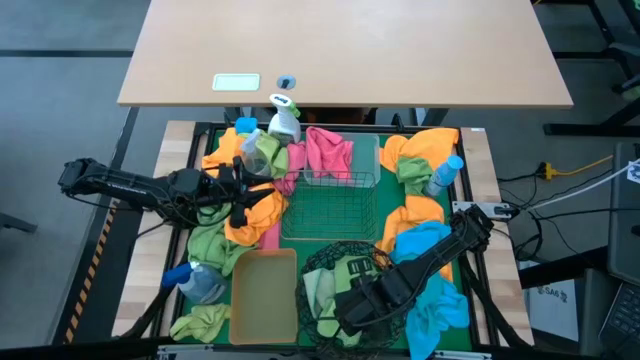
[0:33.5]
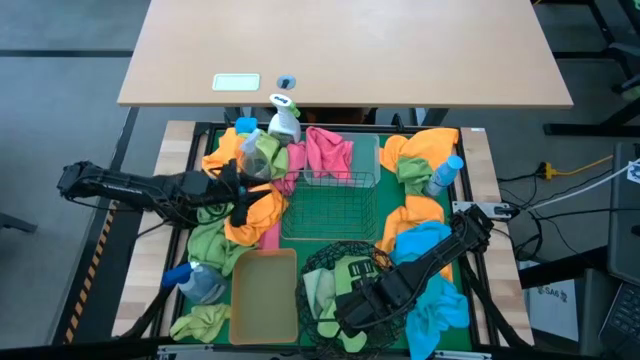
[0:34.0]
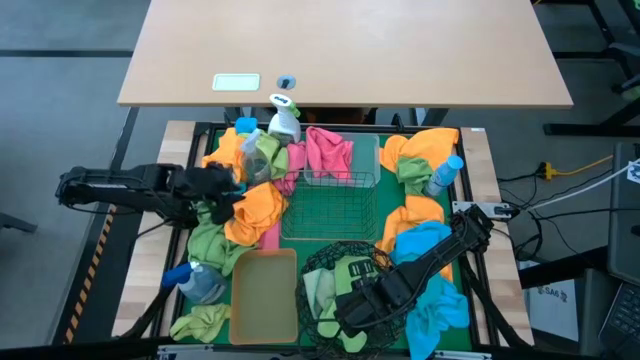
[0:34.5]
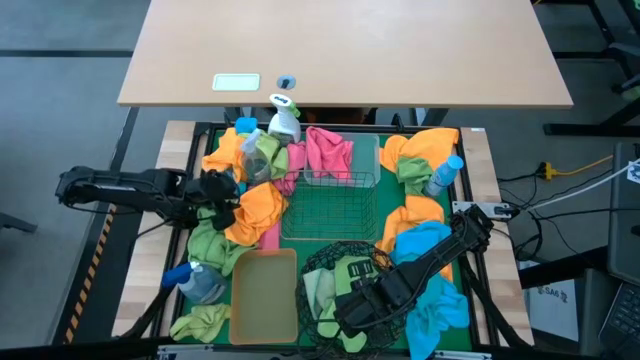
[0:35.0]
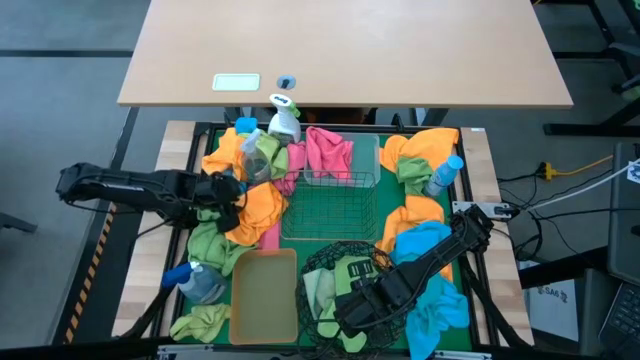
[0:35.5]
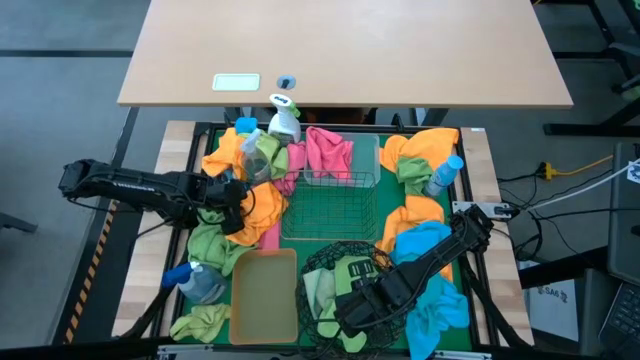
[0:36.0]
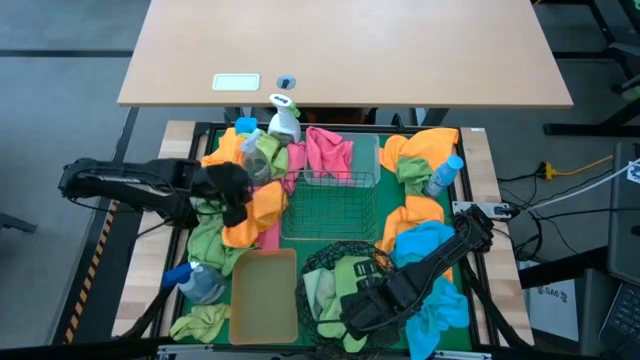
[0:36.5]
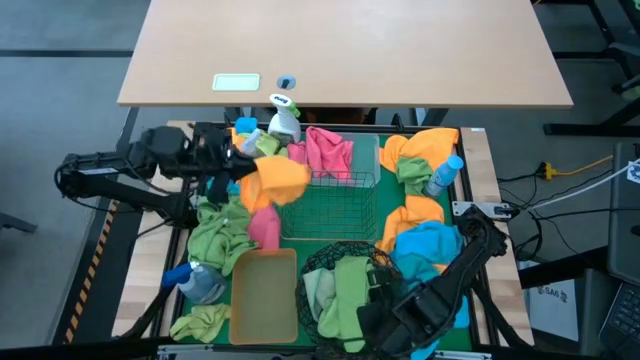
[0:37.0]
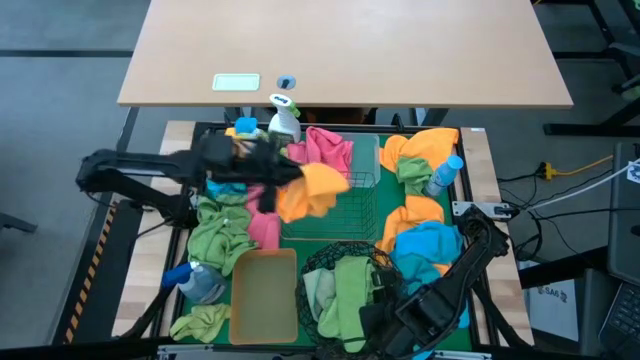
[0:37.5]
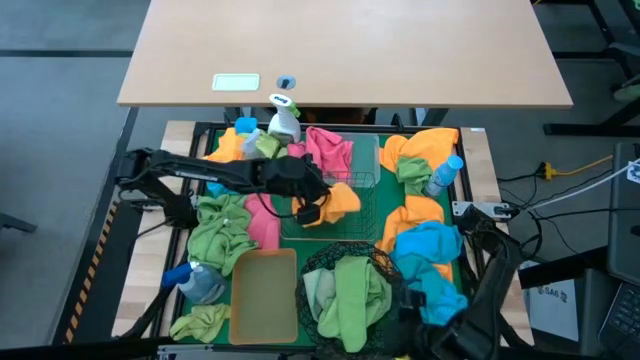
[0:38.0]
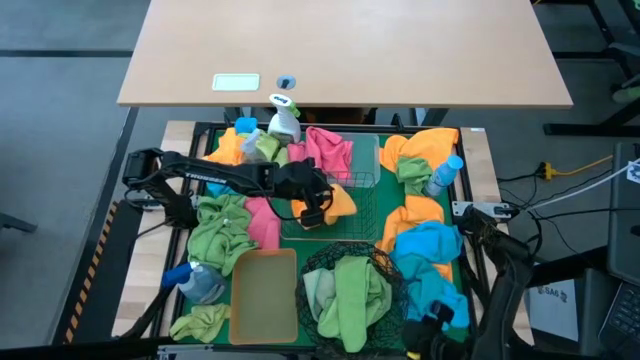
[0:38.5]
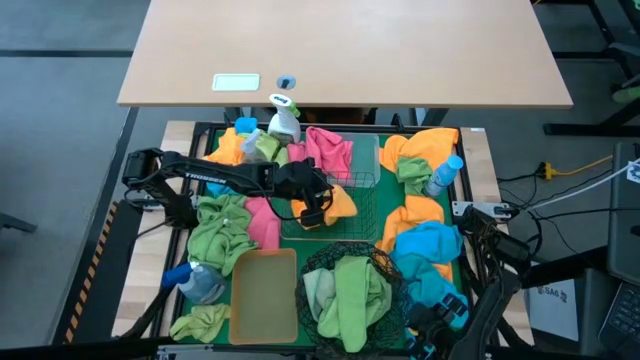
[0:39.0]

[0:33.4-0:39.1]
Task: Sort microfiber towel by color & place in baskets
Put the orange microfiber towel into the gold wire basket

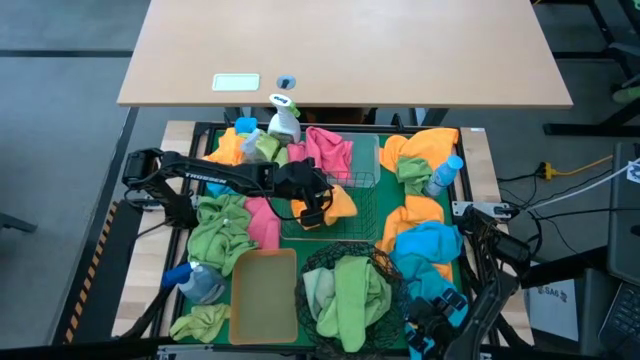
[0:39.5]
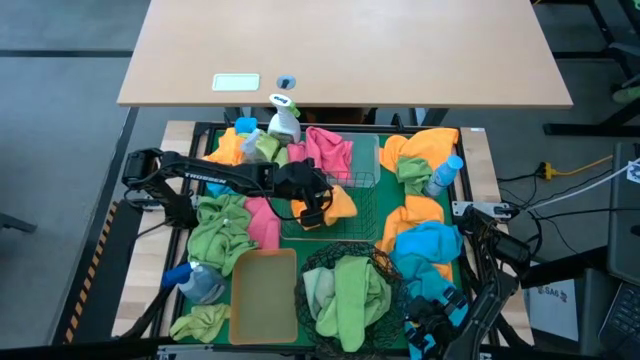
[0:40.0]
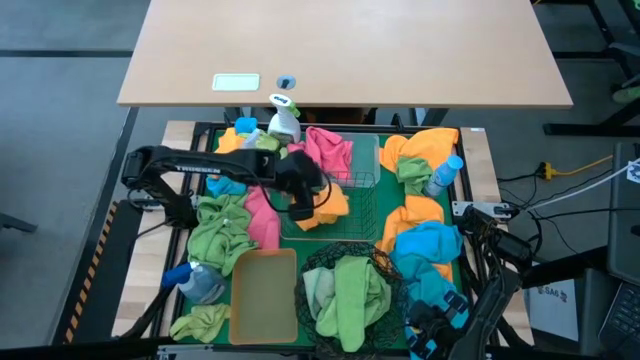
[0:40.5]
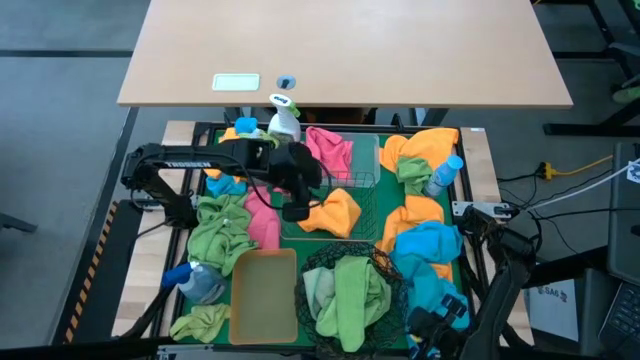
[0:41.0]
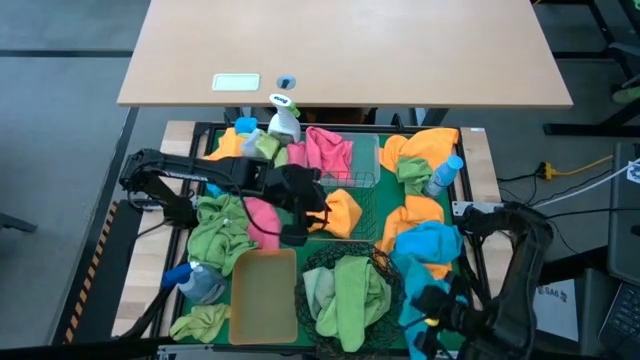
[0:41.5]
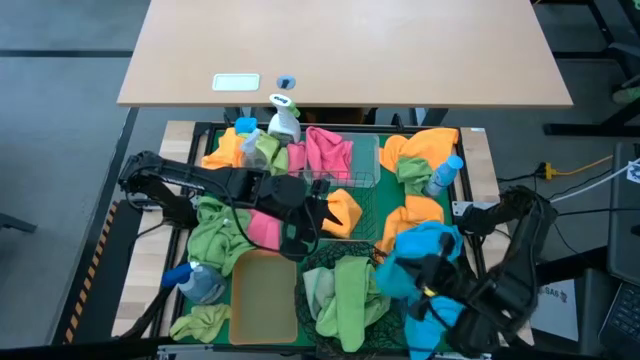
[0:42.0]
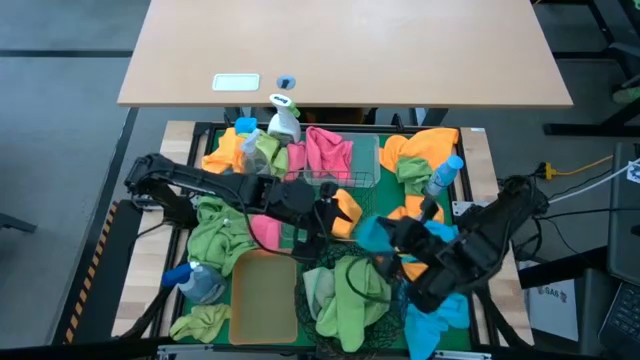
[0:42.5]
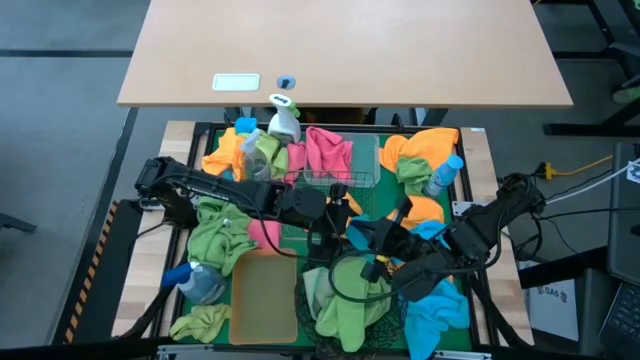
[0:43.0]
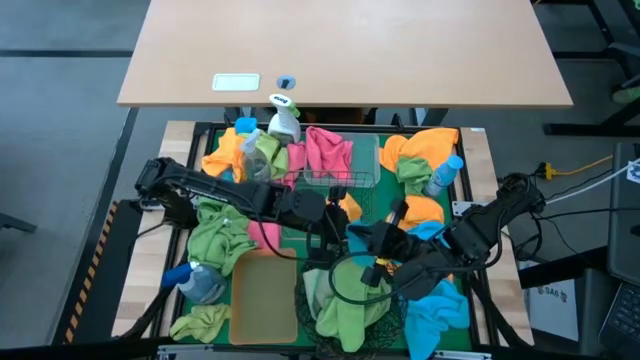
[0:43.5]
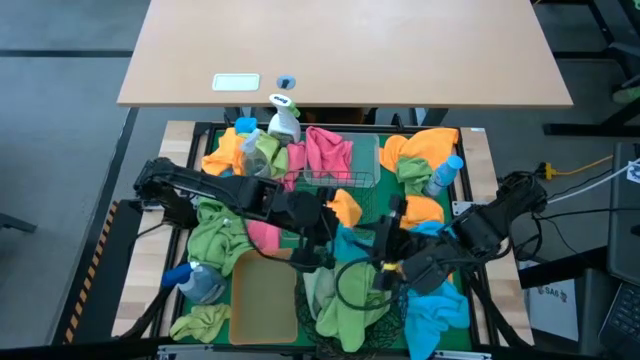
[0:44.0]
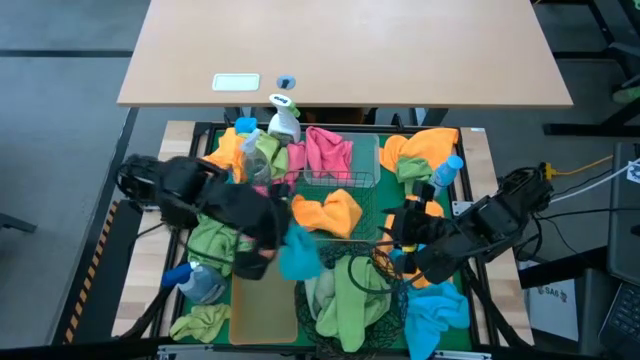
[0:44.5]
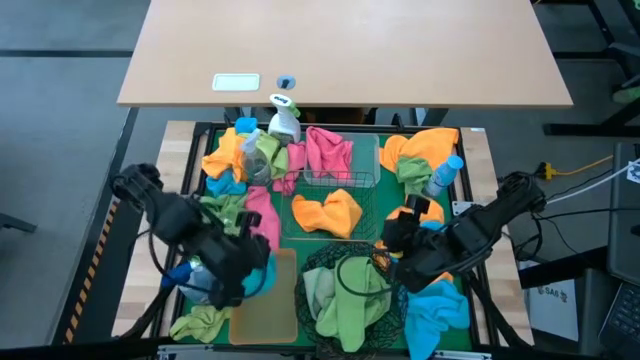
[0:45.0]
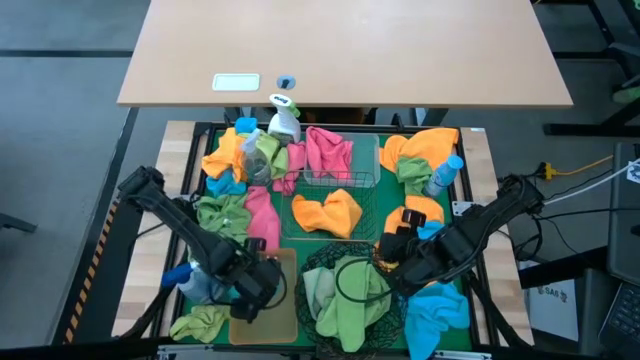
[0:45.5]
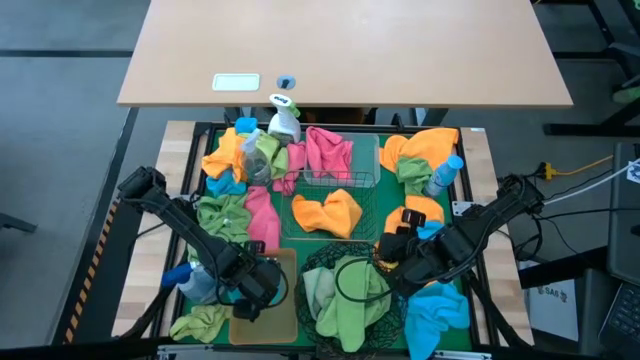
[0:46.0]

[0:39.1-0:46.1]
Put the blue microfiber towel into the orange bin

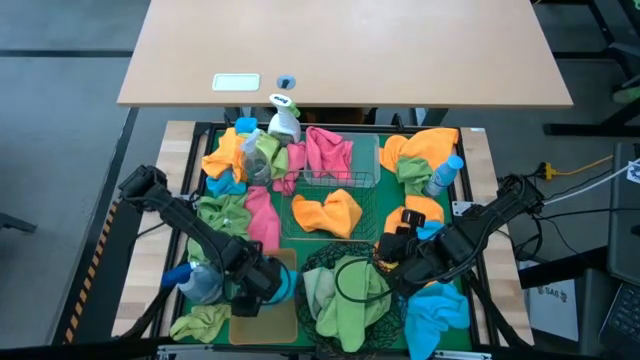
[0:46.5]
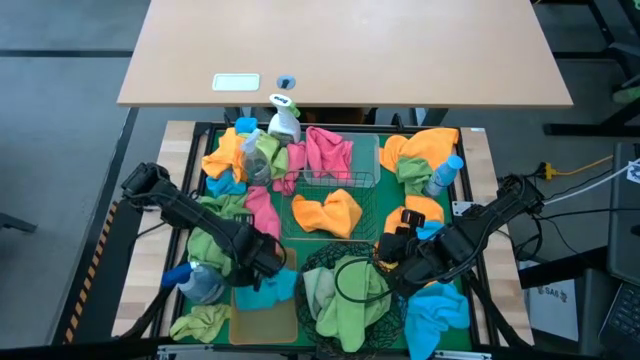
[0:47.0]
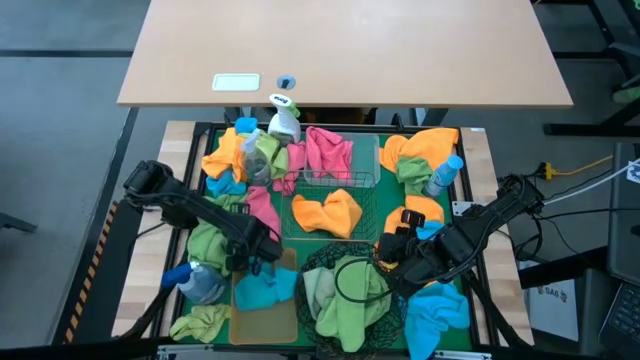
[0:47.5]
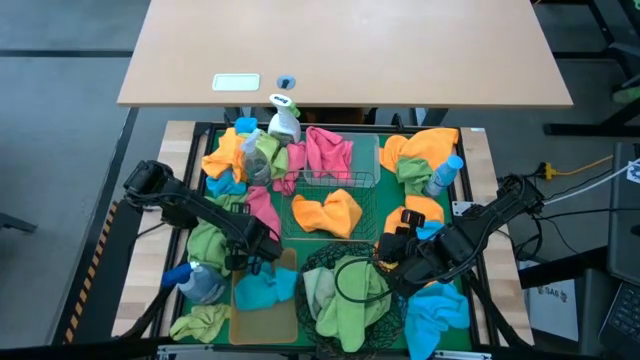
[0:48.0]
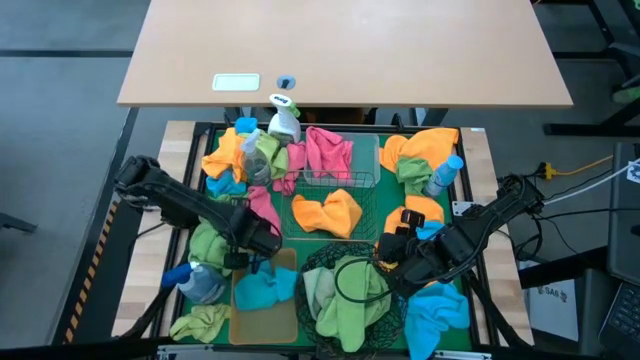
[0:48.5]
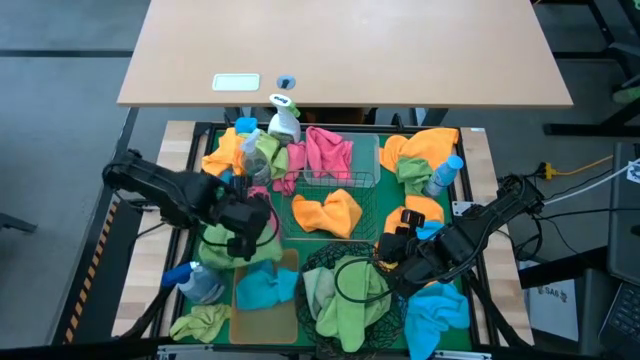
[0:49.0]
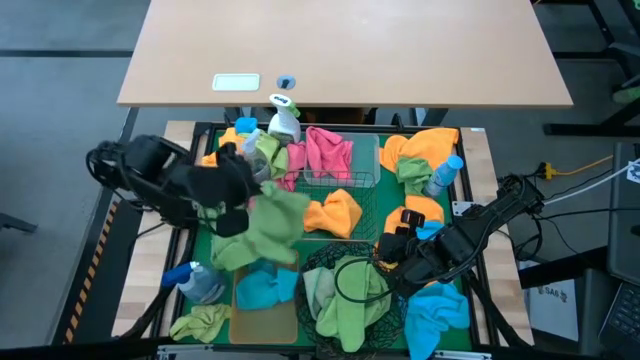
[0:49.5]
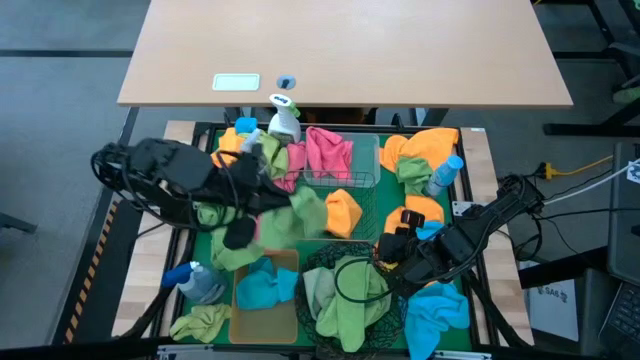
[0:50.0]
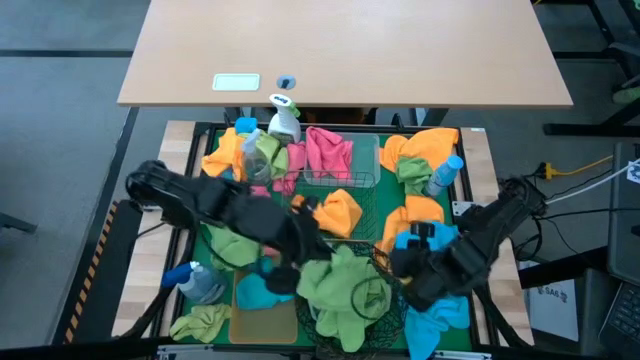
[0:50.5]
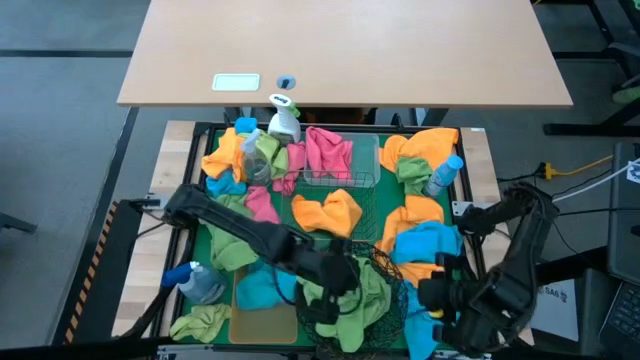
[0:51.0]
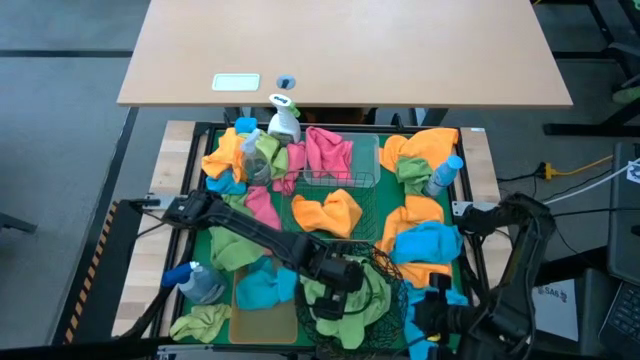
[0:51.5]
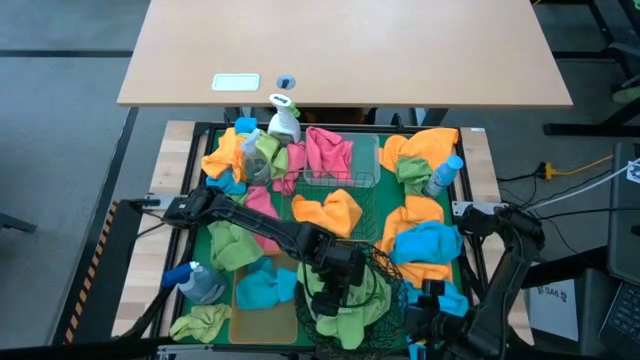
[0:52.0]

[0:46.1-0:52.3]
Put the green microfiber towel into the black wire basket

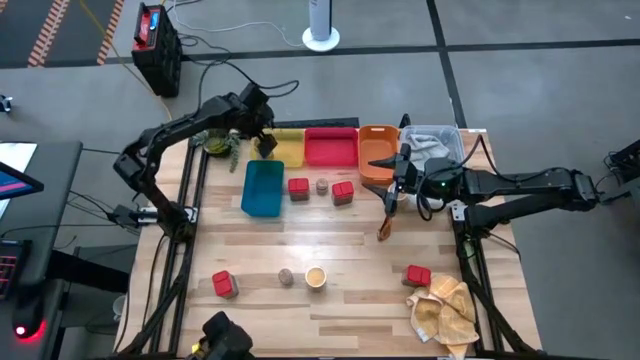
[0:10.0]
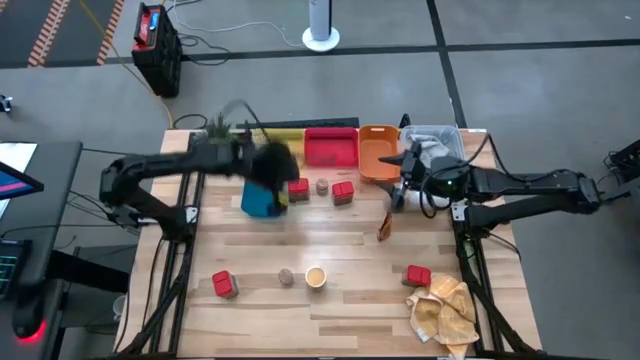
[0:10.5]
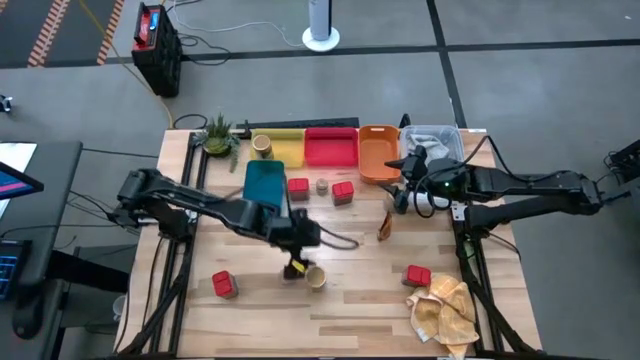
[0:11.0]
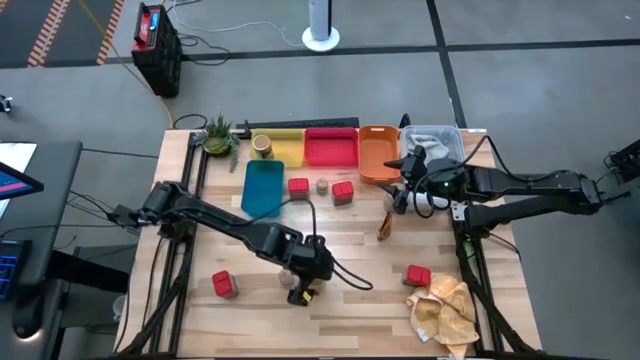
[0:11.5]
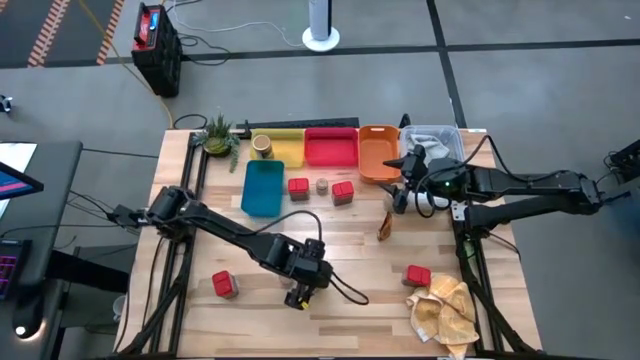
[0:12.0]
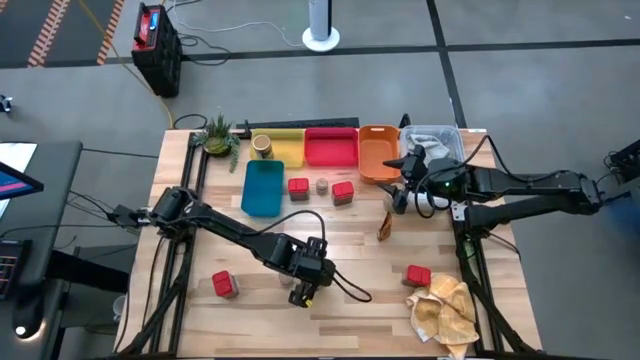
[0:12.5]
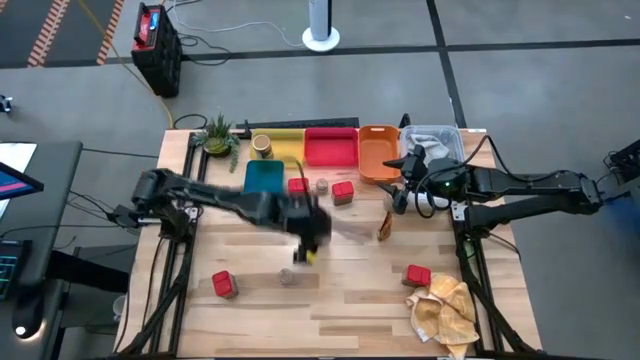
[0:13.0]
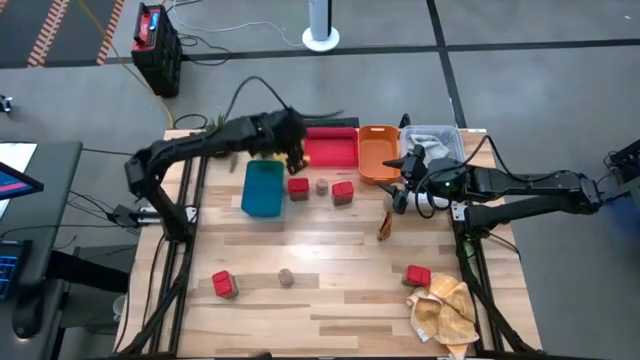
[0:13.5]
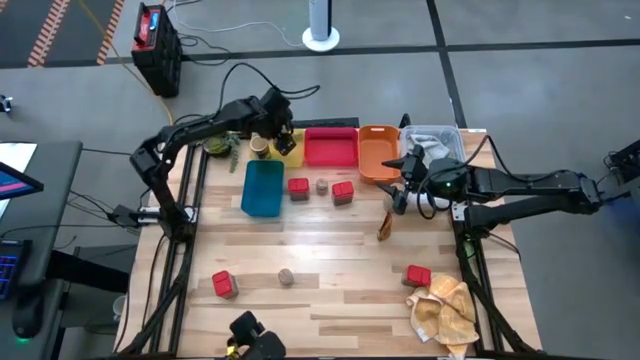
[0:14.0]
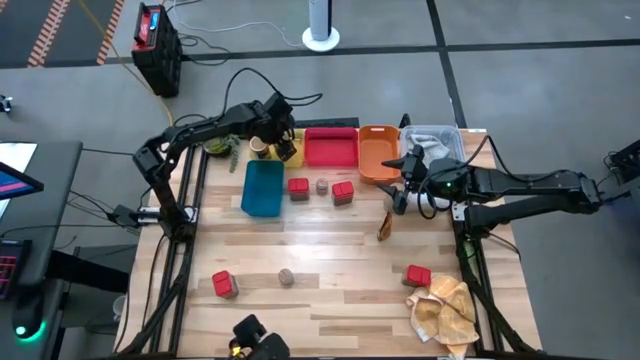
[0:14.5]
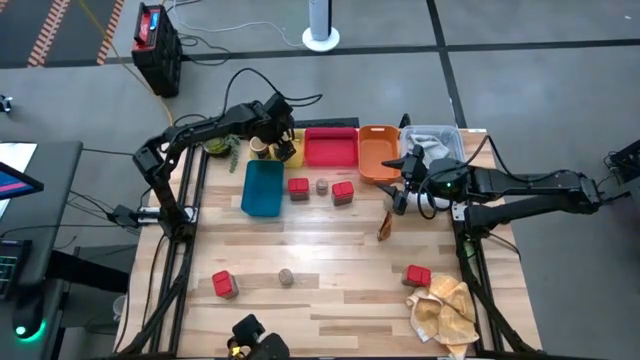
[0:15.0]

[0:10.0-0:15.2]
Task: Sort spices by type
Put the bottom golden seasoning bottle into the yellow bin
